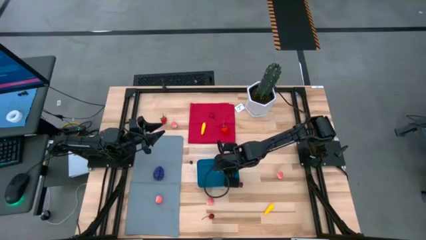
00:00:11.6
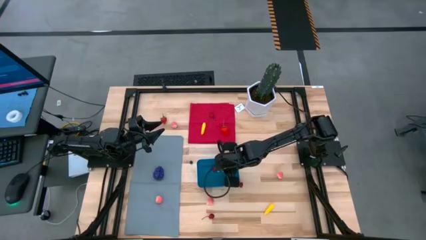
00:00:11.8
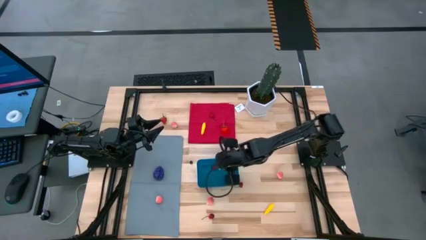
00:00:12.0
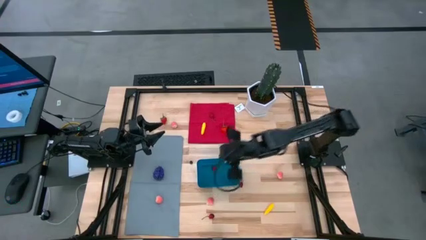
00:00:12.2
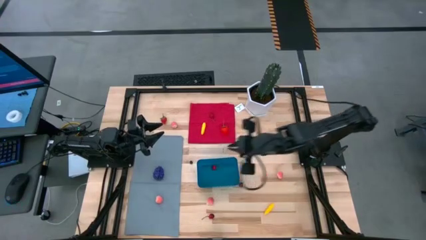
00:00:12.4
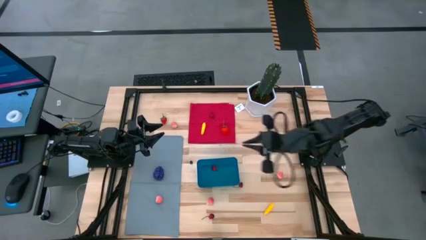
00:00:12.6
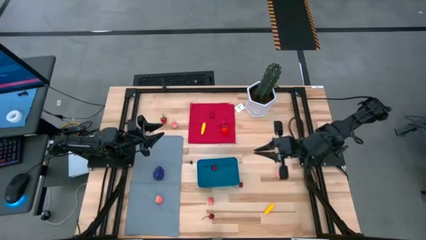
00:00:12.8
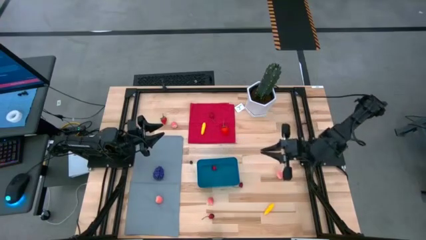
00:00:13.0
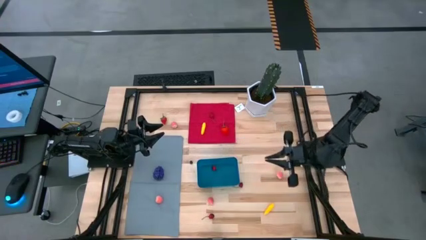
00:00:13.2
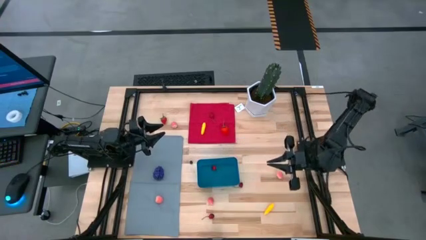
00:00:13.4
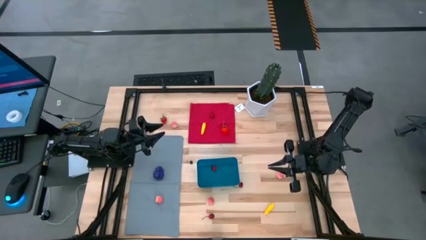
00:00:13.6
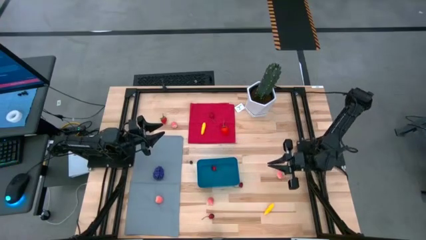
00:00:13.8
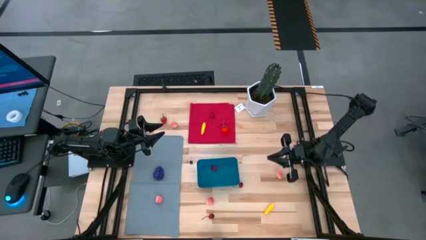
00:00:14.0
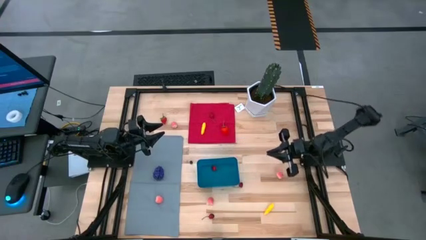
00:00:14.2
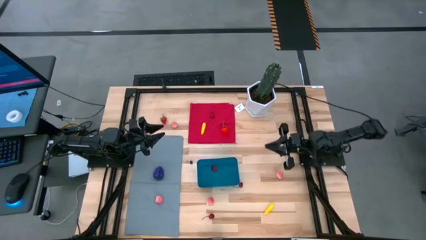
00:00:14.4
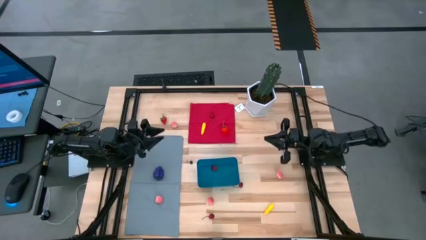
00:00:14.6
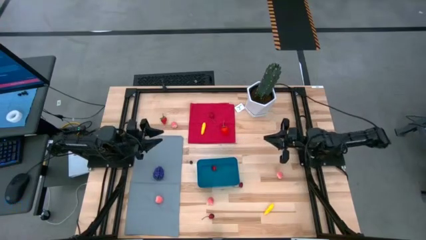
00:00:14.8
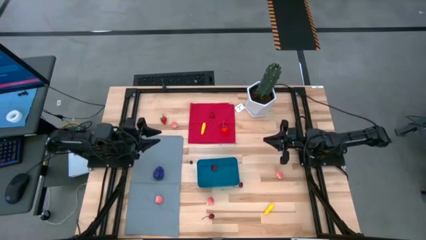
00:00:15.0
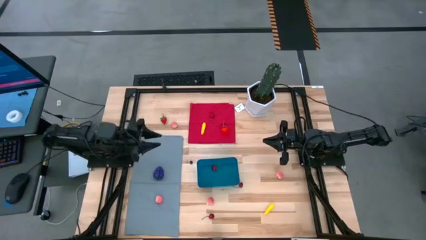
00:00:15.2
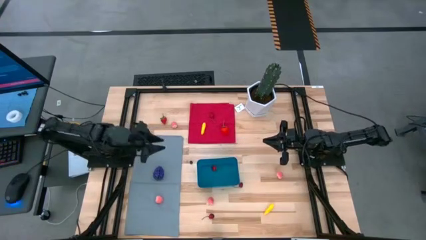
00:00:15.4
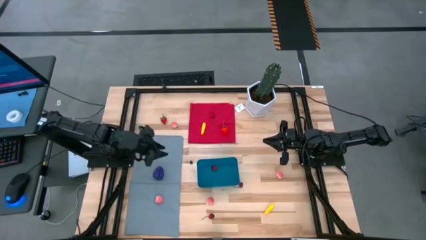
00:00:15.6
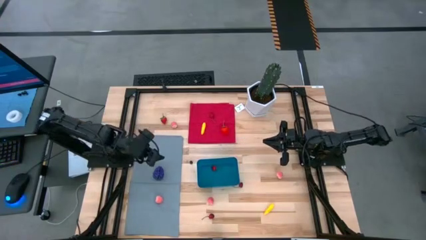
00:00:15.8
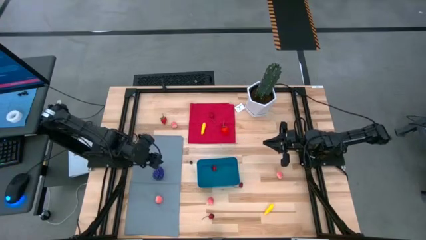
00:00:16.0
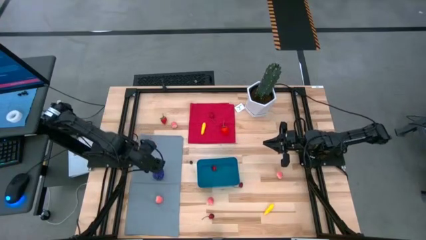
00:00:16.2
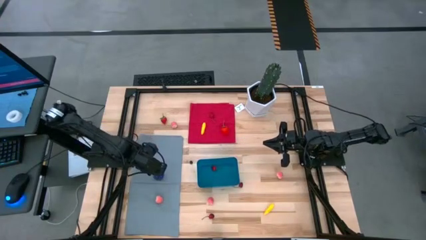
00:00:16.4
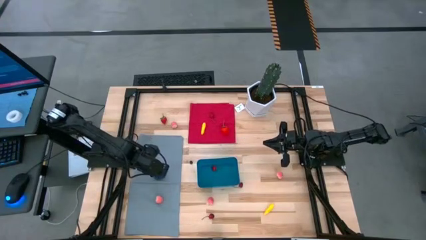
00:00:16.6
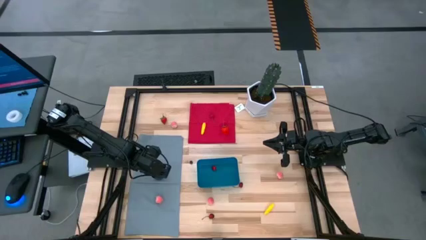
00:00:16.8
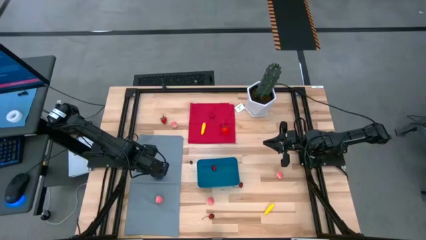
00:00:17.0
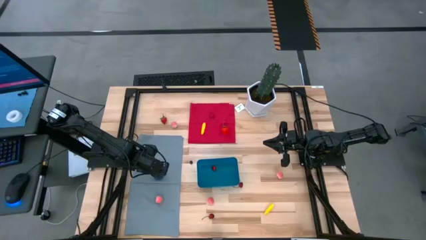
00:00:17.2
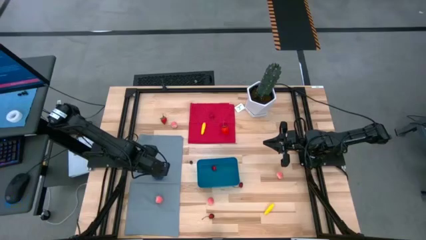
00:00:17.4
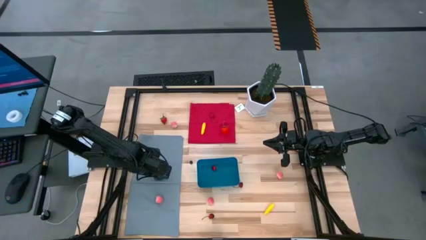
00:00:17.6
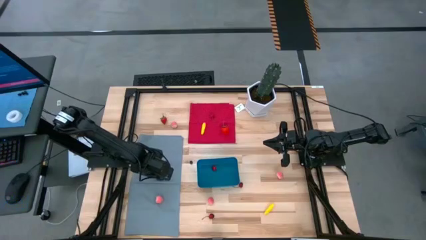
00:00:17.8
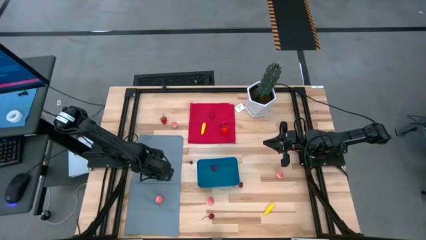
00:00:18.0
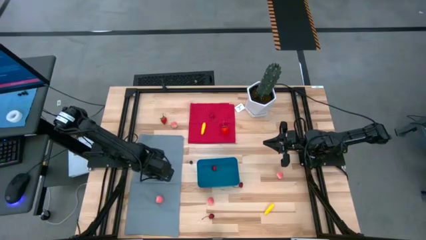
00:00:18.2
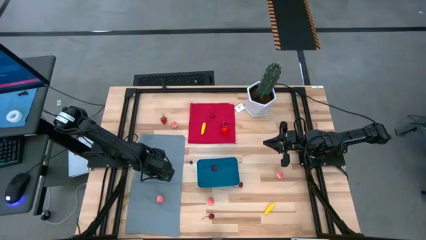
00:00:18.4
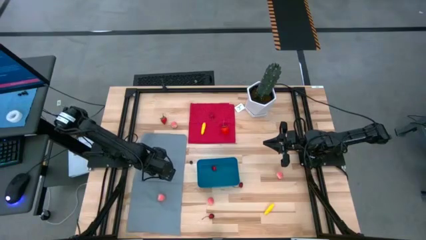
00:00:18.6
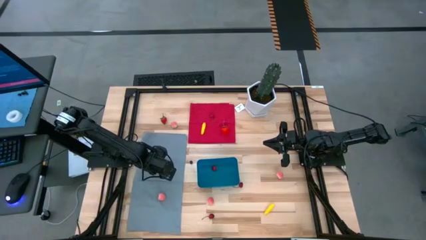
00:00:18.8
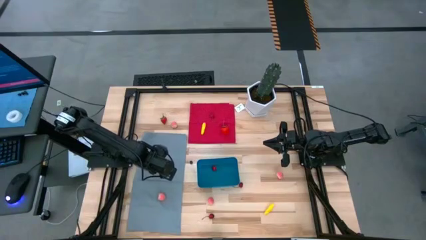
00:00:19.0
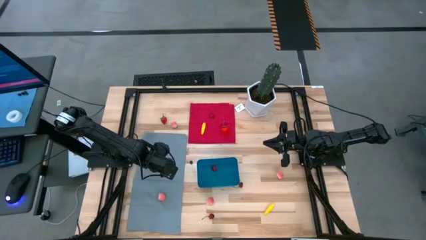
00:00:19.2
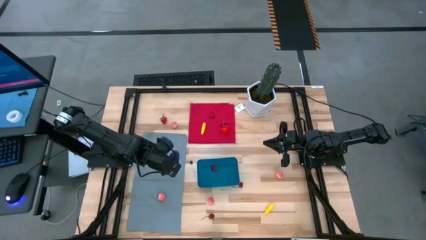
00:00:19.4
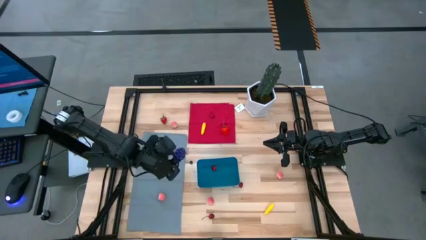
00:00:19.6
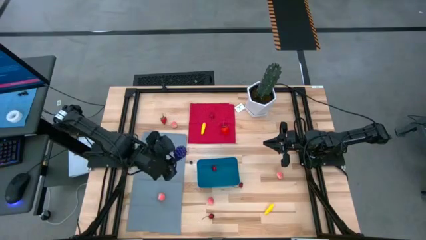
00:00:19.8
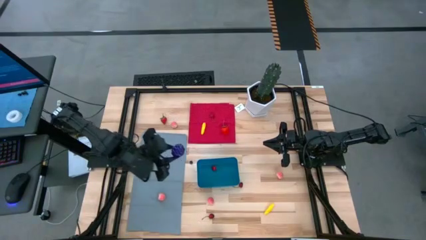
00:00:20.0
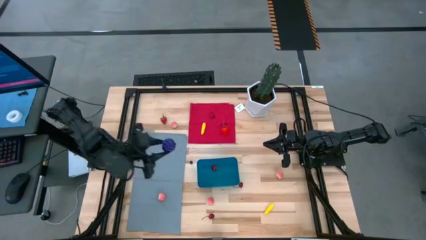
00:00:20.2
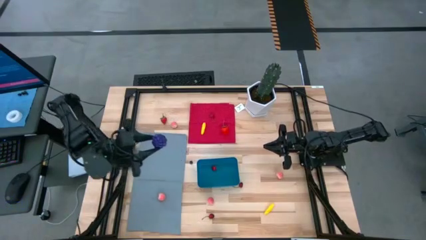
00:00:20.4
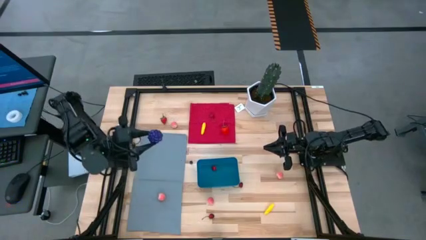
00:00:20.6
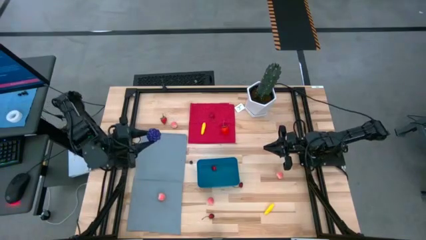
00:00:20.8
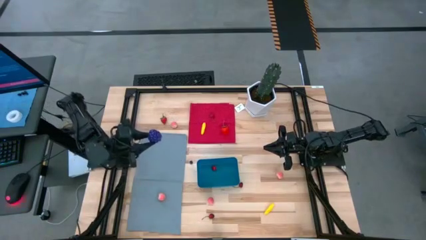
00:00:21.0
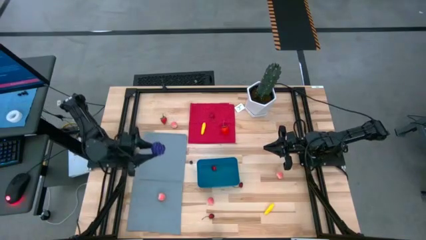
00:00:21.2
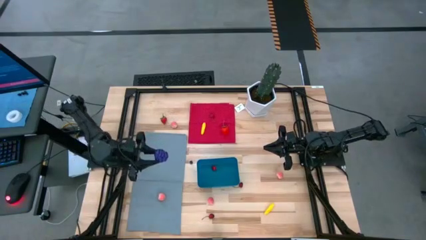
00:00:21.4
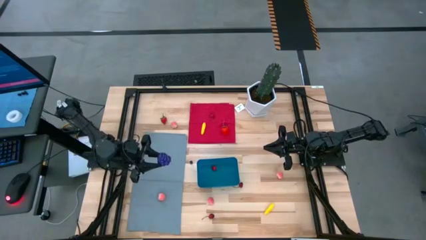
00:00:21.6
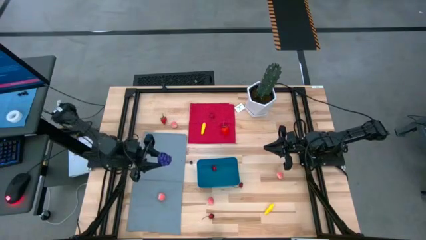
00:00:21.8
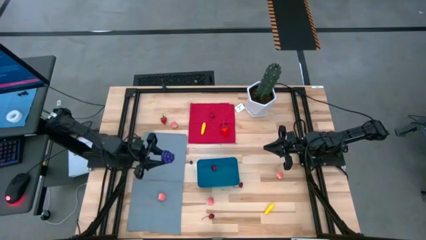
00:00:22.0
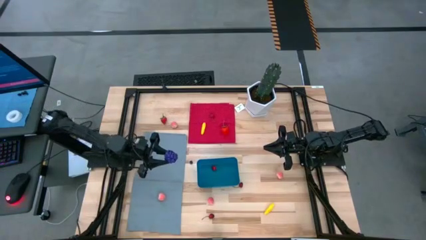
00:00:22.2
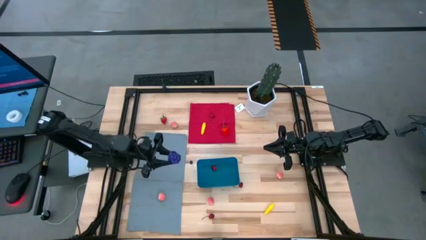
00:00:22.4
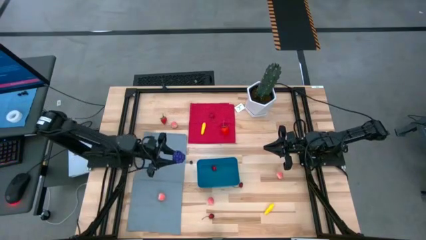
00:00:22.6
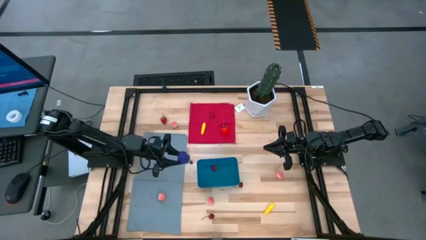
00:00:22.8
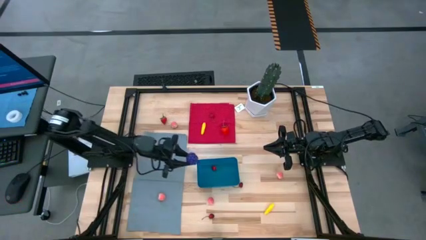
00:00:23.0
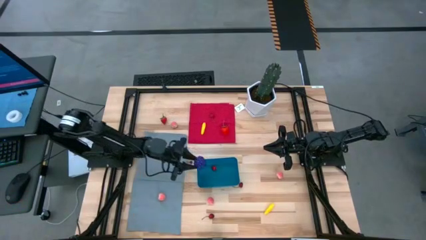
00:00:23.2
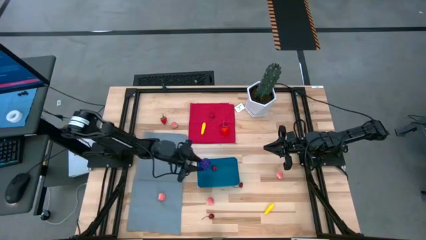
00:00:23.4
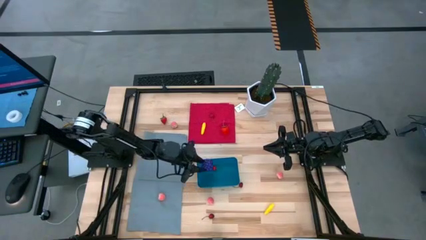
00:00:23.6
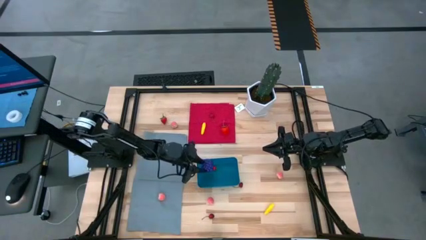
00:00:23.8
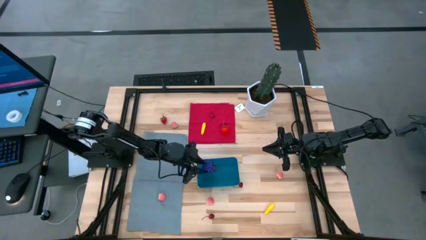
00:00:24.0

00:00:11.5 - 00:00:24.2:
Task: Pick and placing Produce into tupperware
Put the grapes into the blue bin
